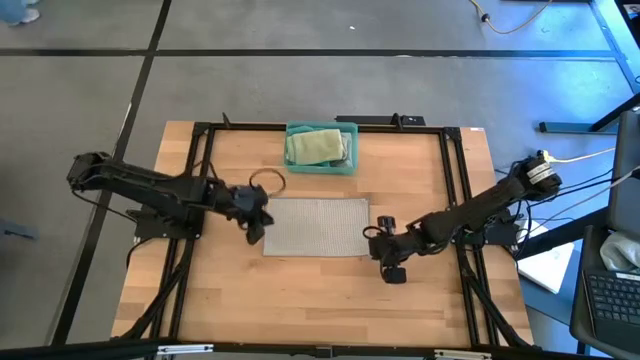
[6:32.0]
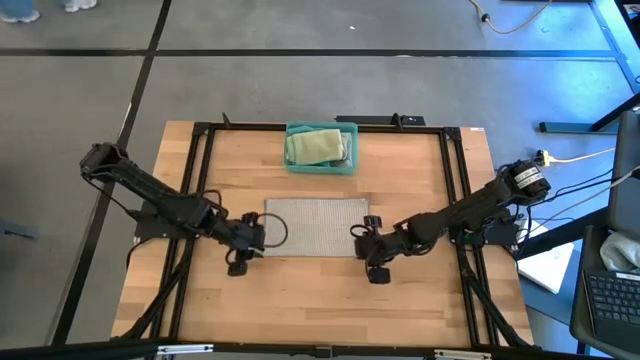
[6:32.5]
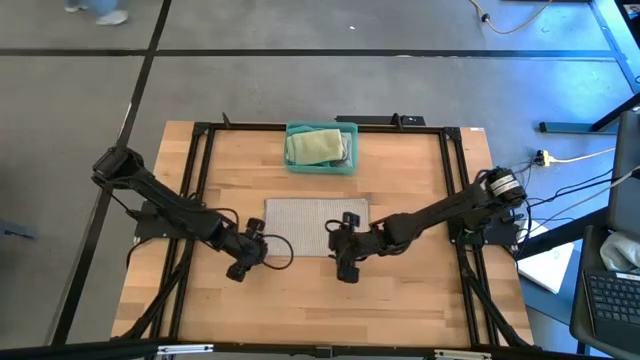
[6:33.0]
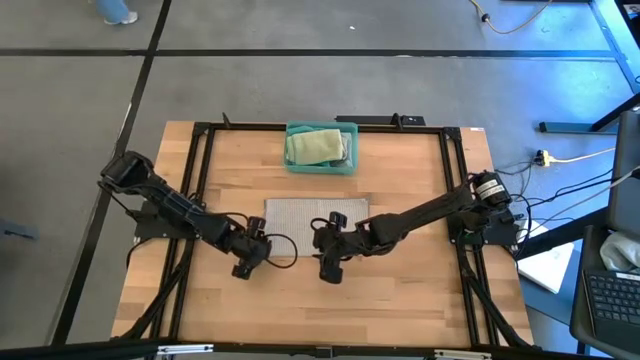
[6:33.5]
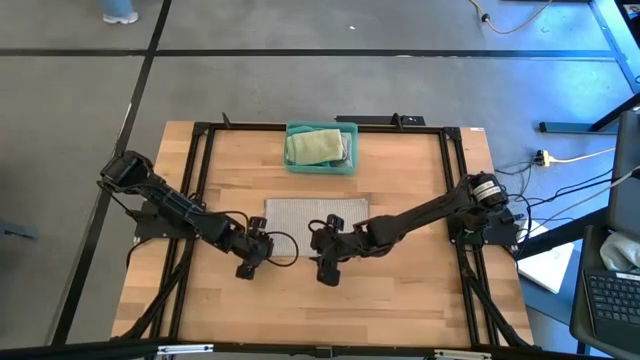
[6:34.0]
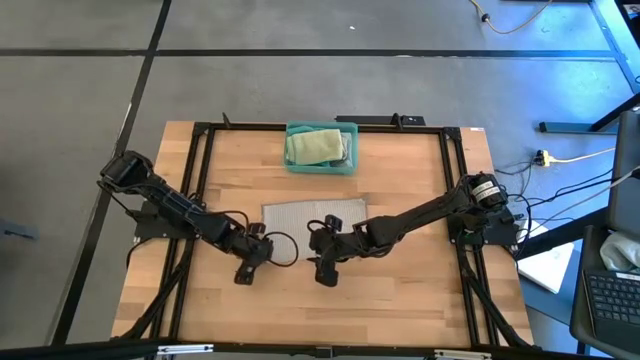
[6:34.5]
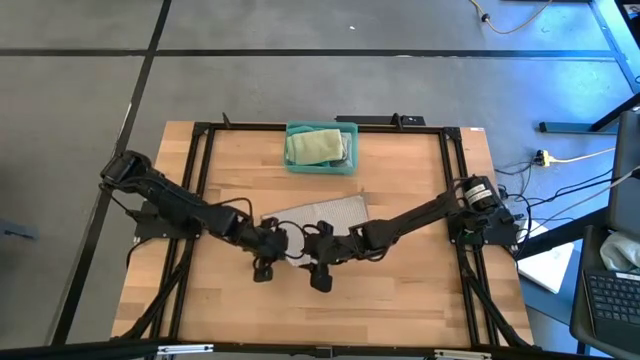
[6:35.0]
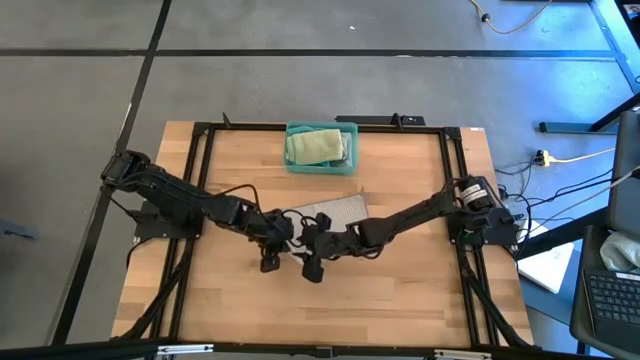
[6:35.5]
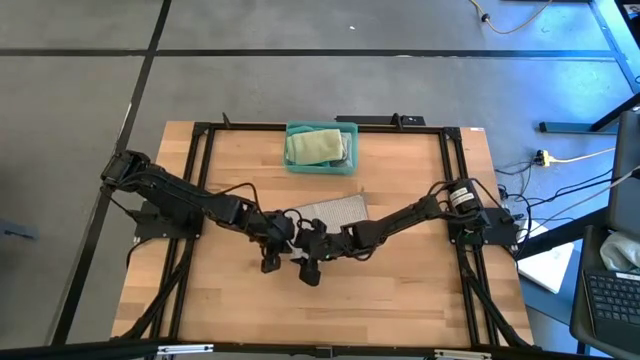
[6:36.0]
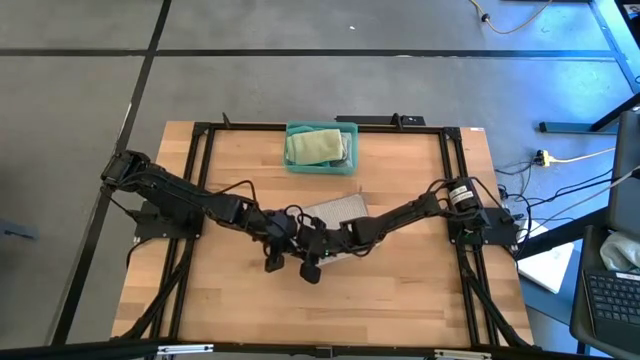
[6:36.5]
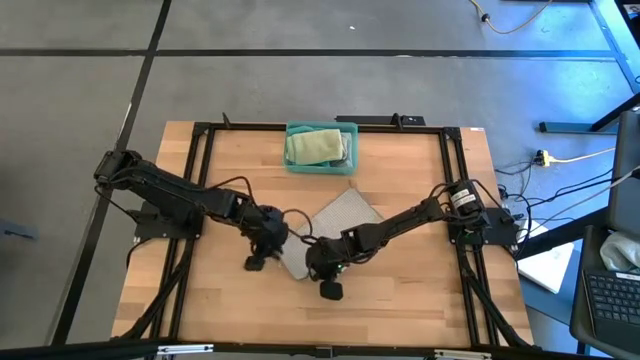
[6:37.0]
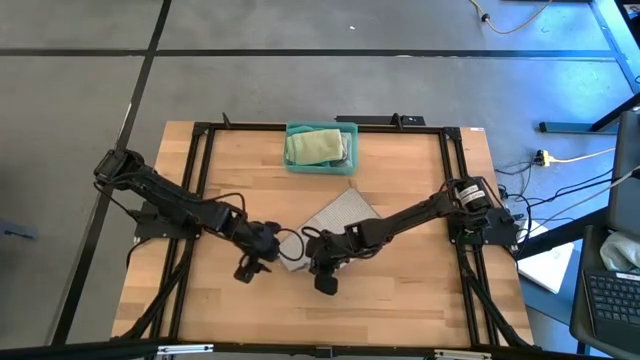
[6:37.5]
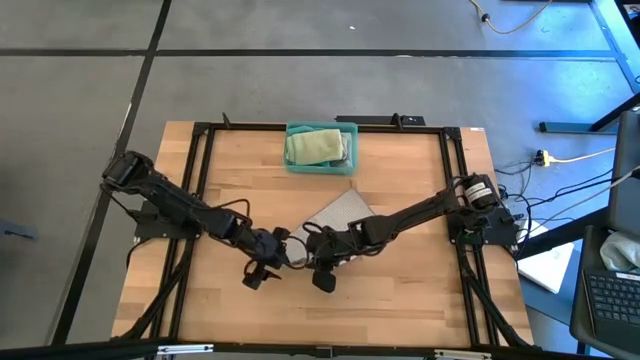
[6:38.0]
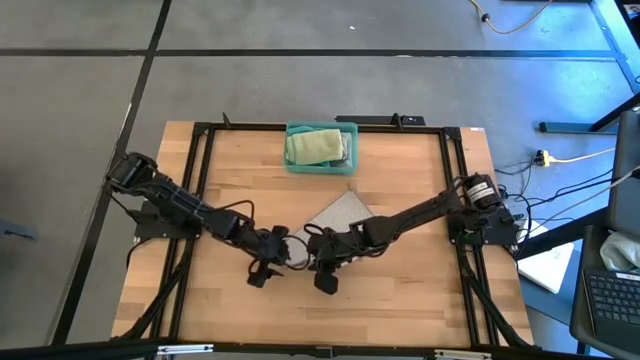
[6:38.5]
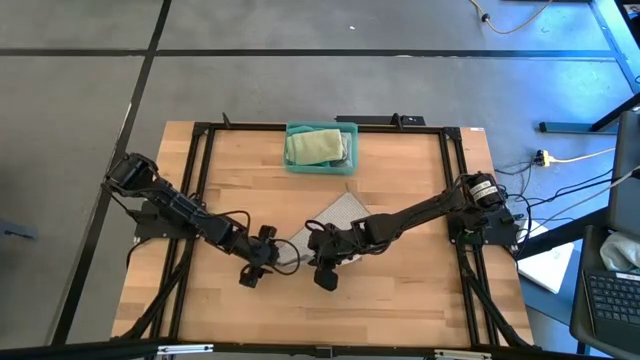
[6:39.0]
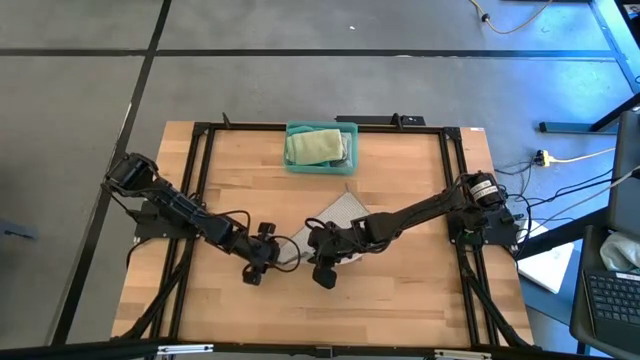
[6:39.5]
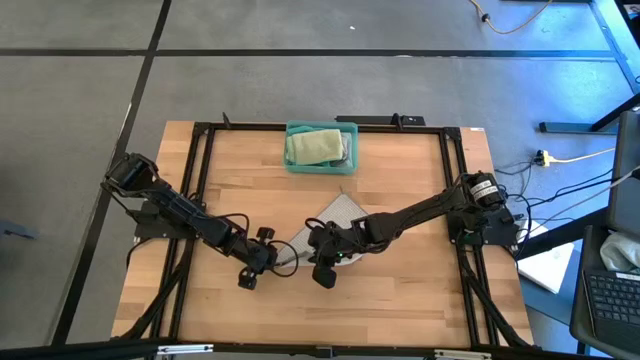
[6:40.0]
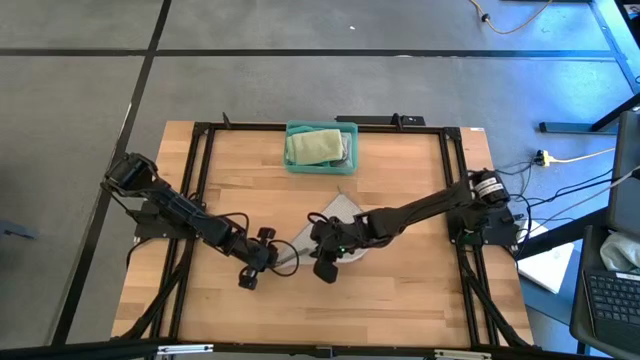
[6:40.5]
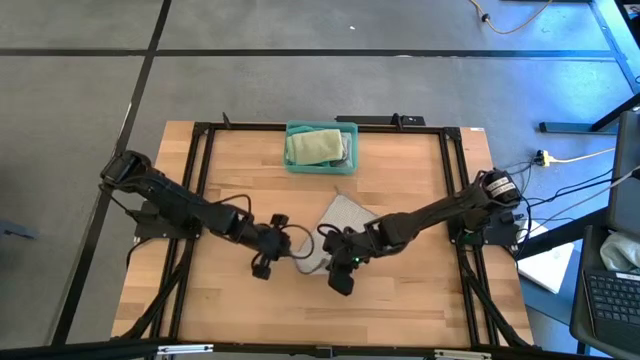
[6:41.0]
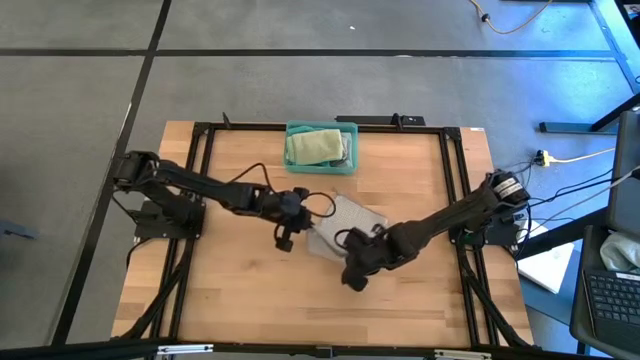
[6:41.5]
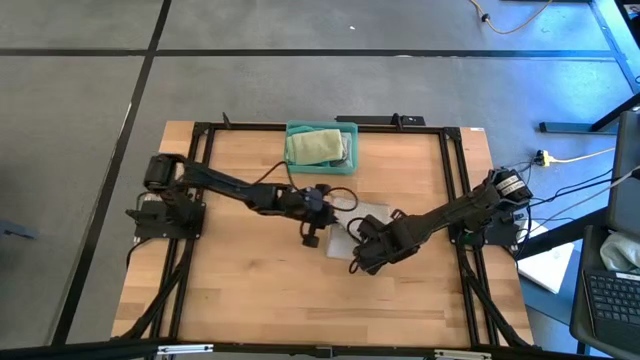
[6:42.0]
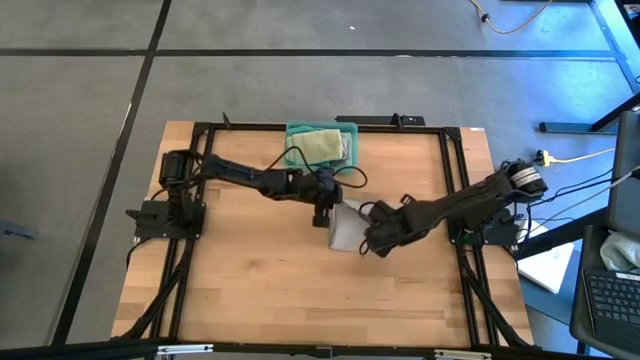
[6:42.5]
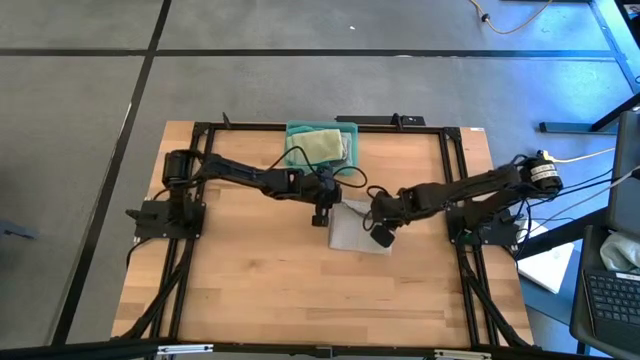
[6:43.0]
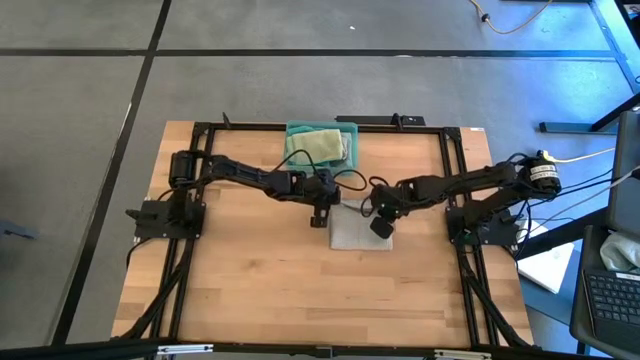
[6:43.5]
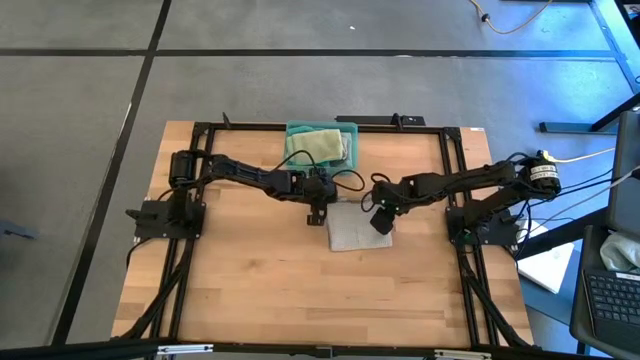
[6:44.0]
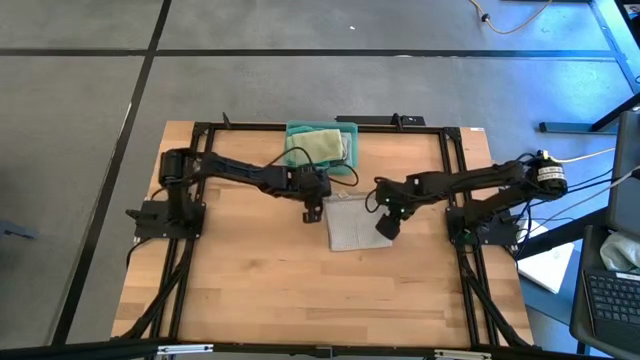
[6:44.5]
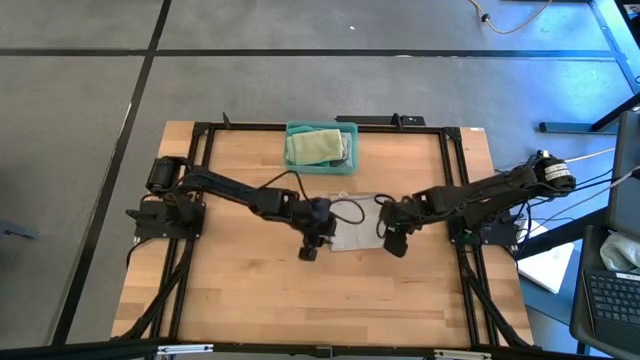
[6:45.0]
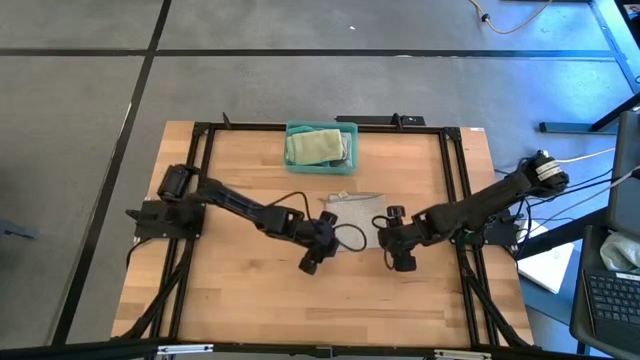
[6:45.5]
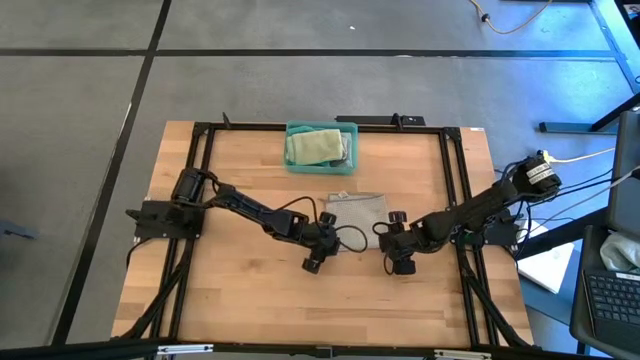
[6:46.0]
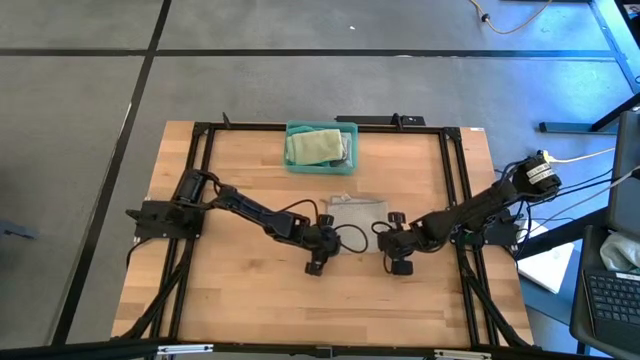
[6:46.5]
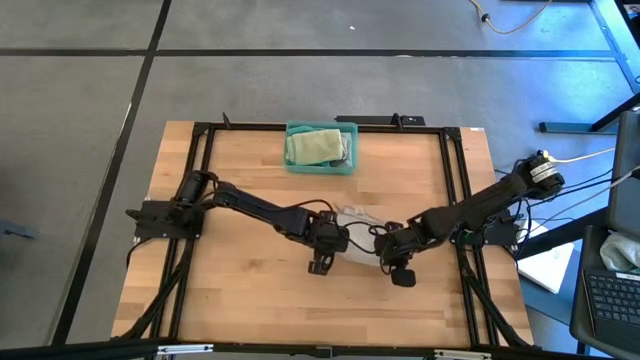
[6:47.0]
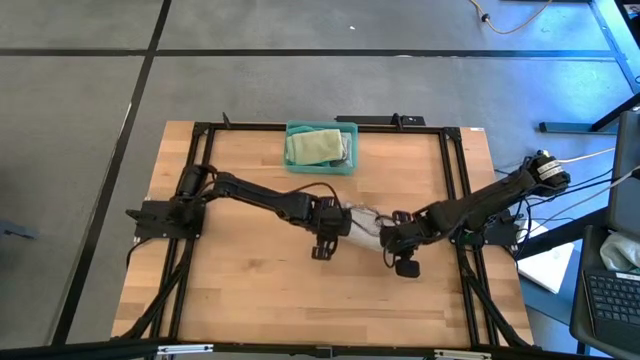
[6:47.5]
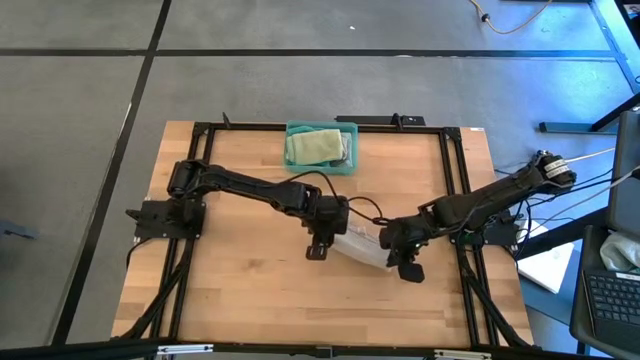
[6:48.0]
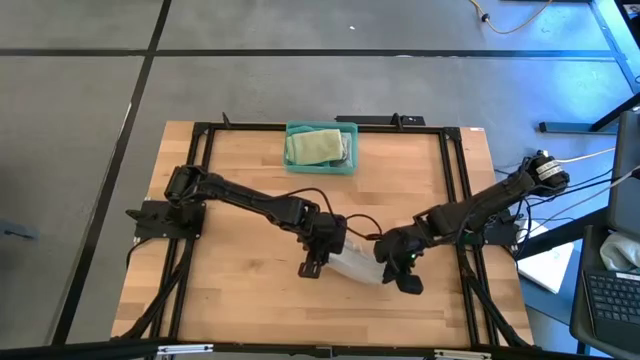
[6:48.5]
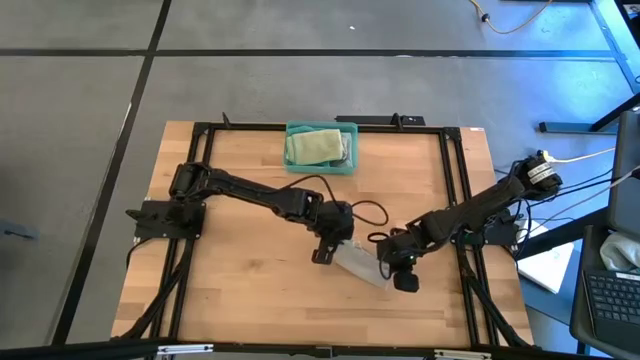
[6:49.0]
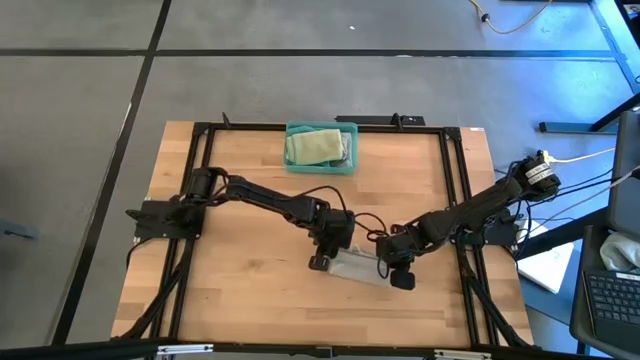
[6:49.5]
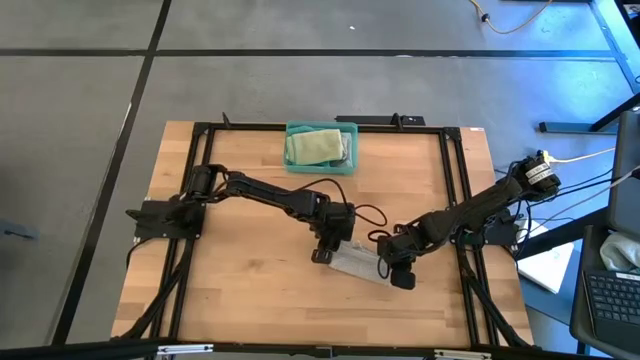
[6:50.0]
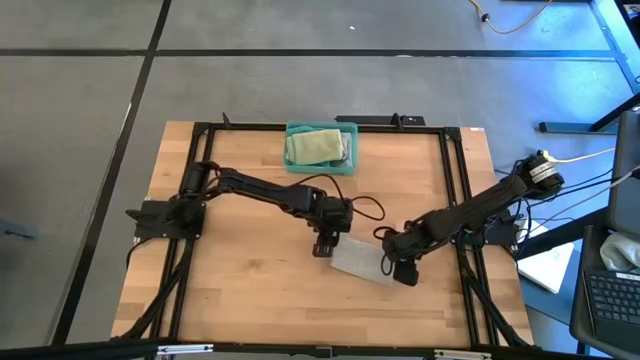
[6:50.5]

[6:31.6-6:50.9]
Task: Fold microfiber towels
Fold the gray towel
